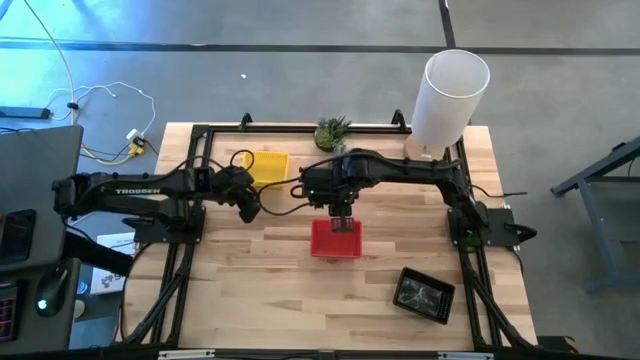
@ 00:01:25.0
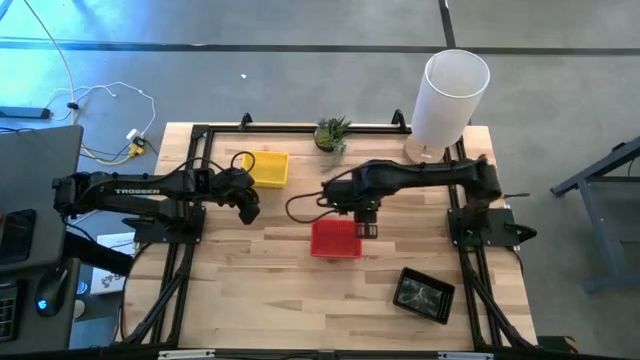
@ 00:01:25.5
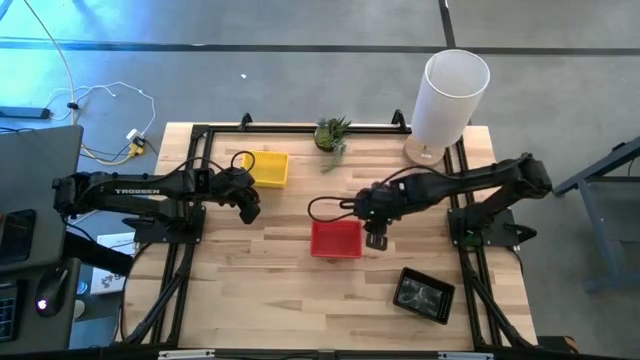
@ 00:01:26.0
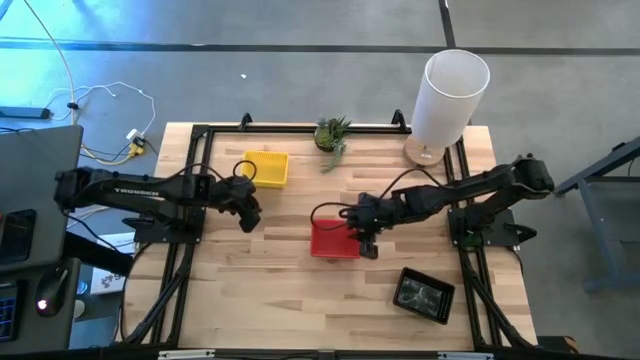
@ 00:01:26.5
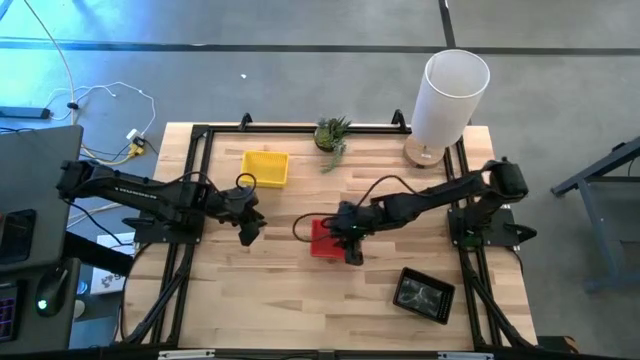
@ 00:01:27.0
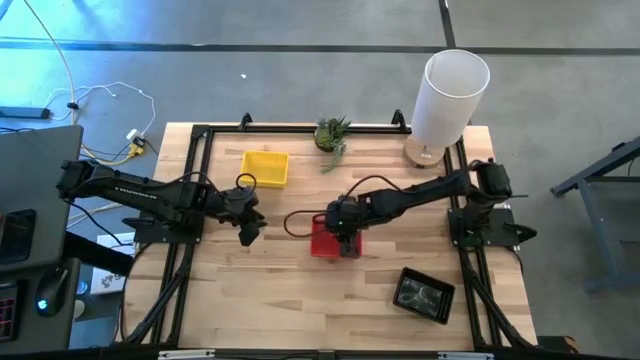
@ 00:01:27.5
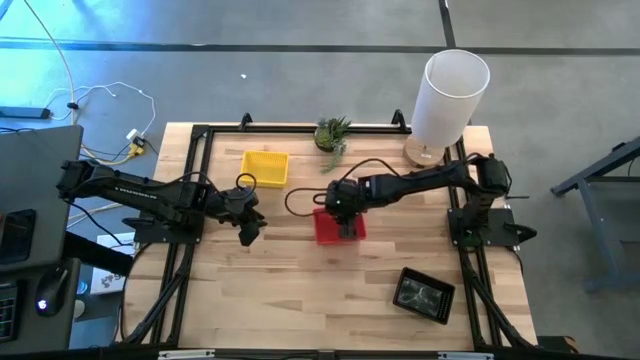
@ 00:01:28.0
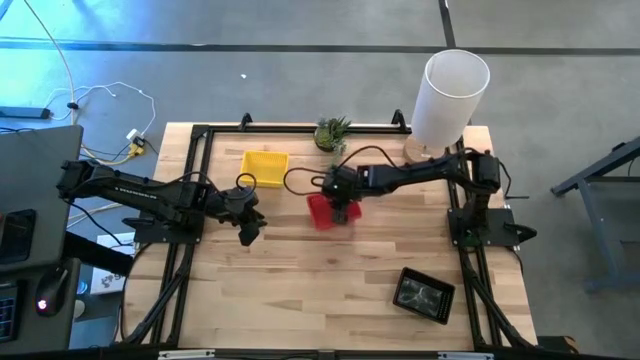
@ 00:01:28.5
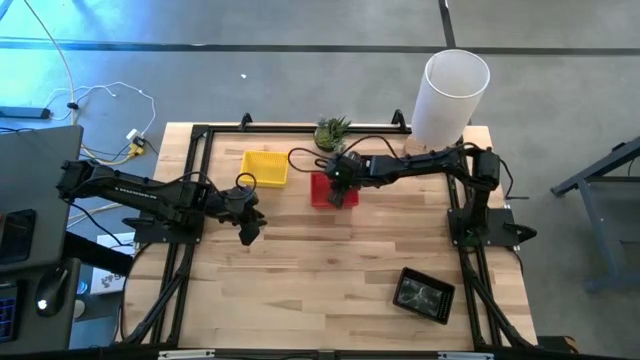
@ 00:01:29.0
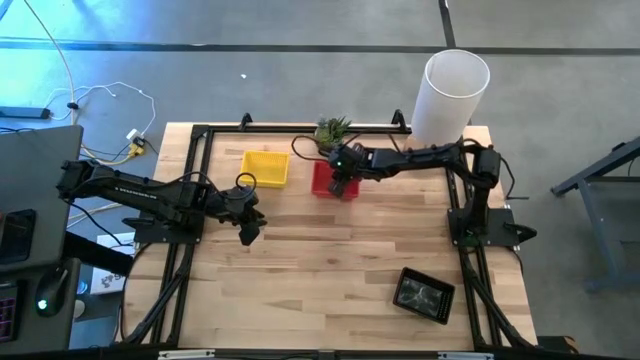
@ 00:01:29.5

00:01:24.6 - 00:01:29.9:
Move the stacked red bins to the top center of the table

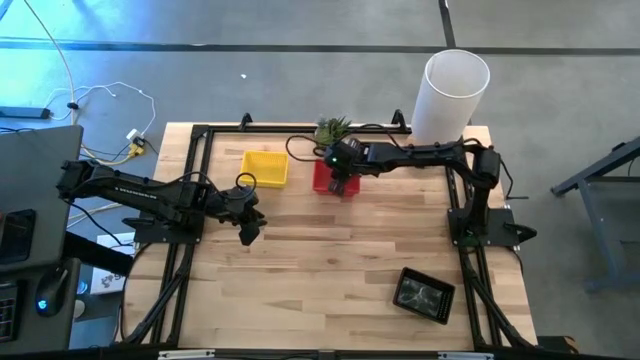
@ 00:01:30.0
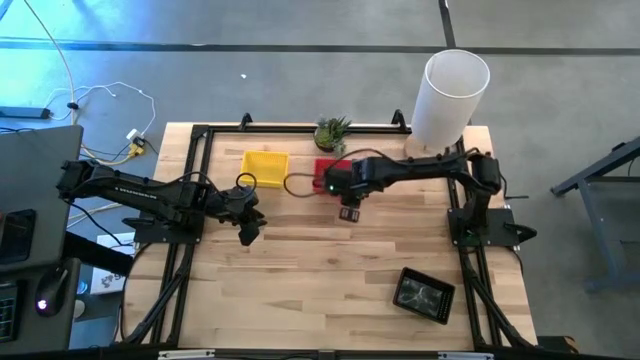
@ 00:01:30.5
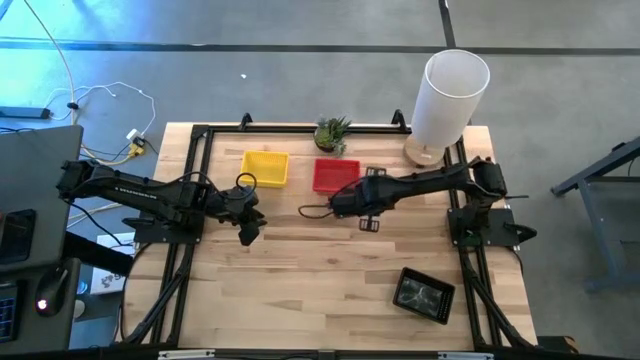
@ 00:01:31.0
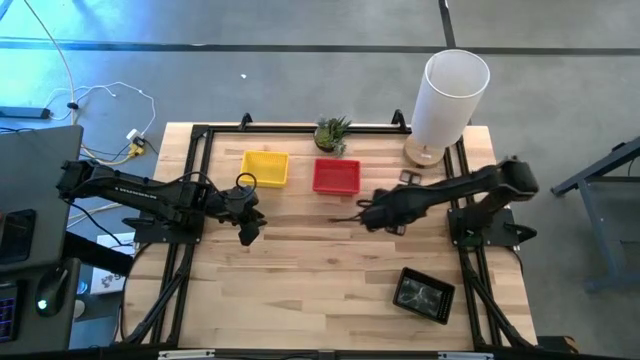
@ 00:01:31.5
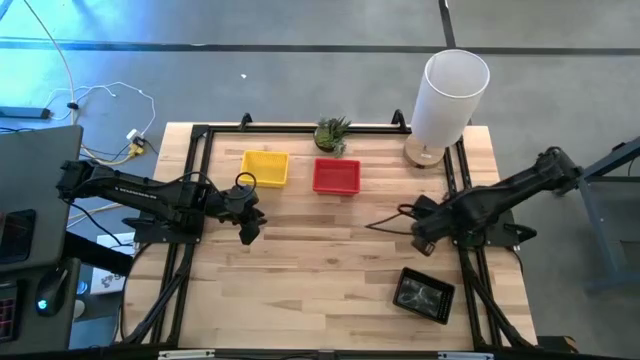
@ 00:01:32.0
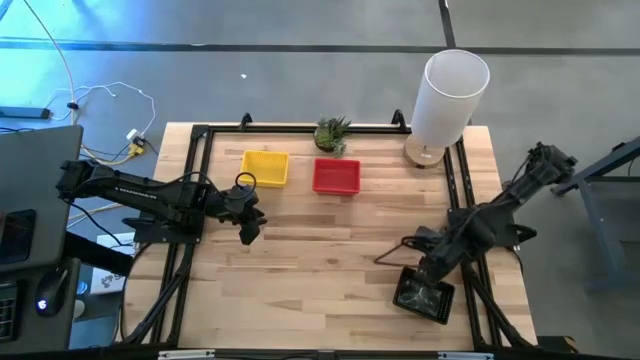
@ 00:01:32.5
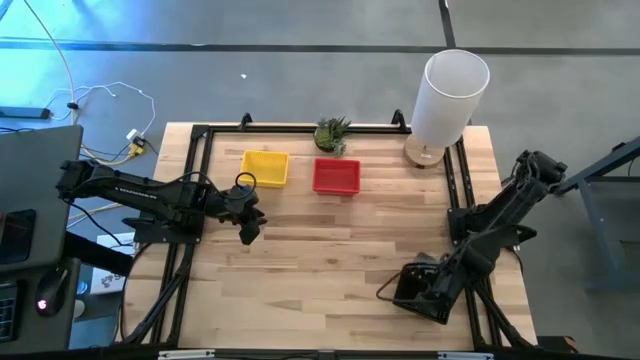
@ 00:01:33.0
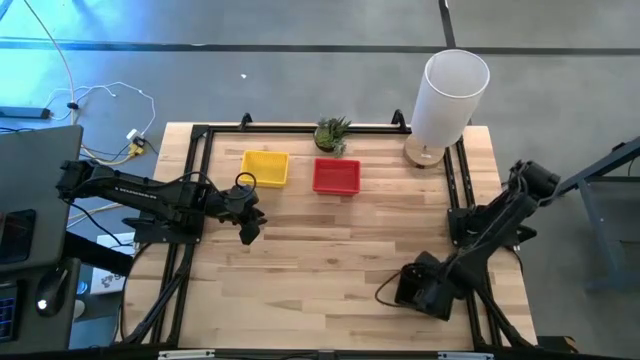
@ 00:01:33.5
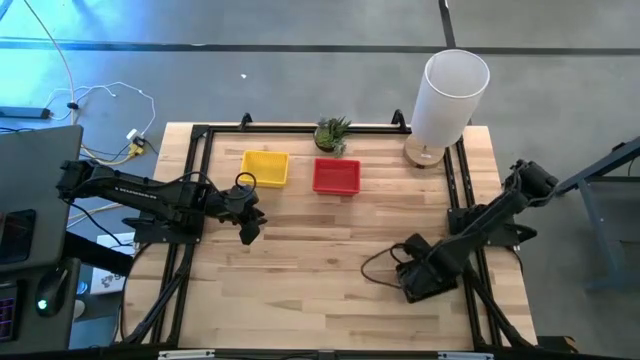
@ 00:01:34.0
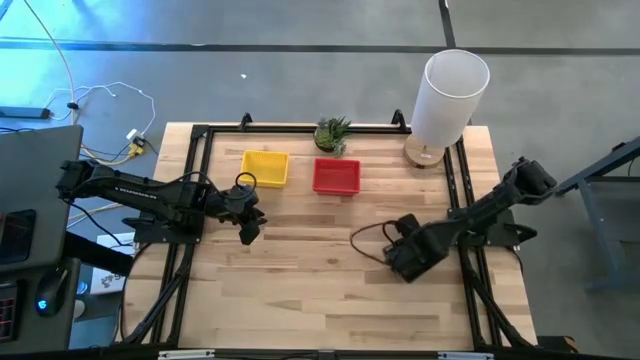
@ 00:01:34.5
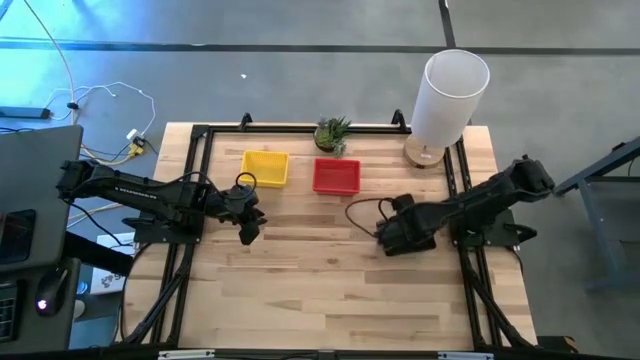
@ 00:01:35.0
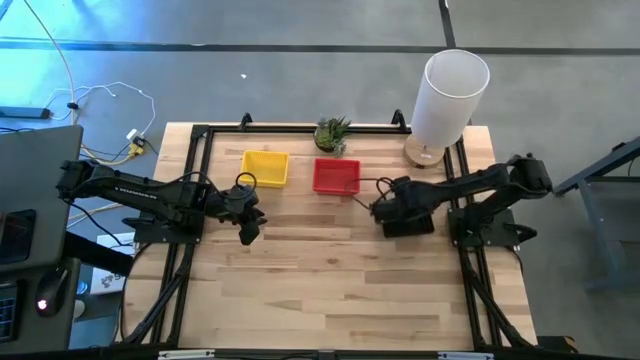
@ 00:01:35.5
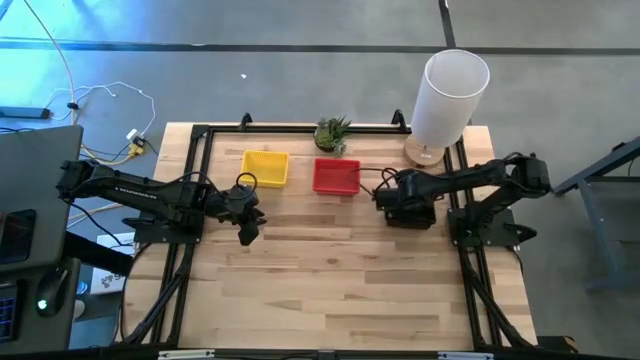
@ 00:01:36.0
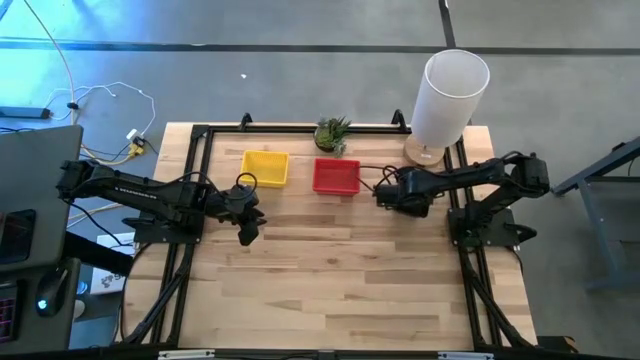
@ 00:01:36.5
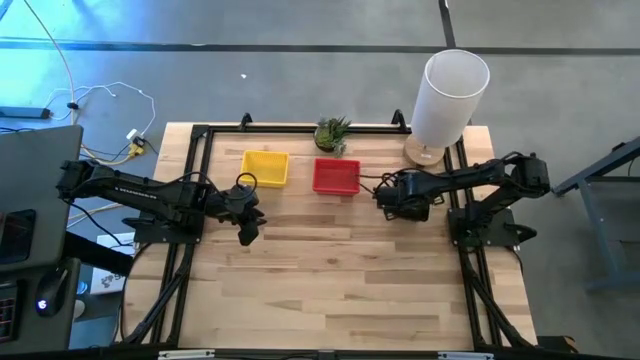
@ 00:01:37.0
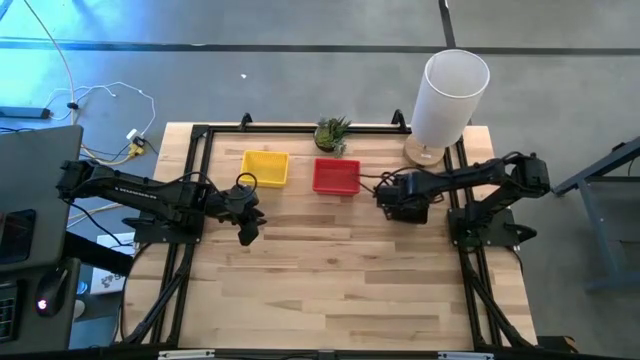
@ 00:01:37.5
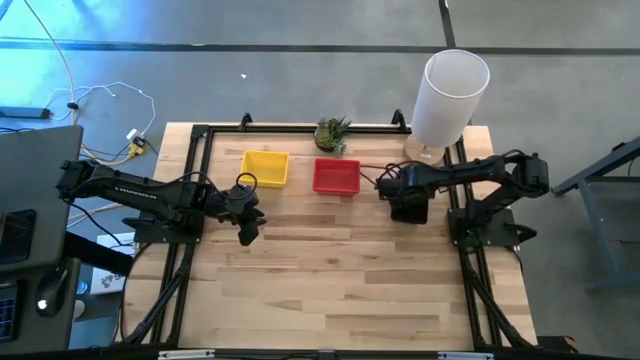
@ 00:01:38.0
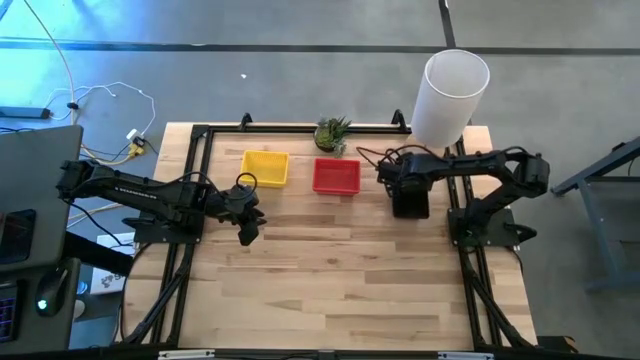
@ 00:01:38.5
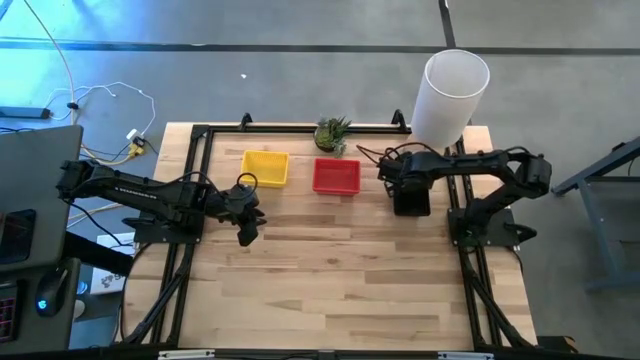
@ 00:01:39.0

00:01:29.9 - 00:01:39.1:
Move the stacked black bins to the top right of the table

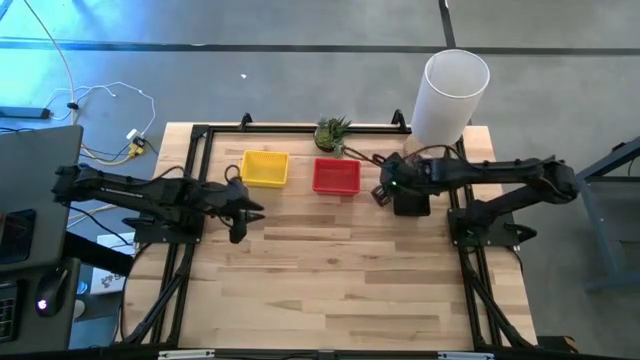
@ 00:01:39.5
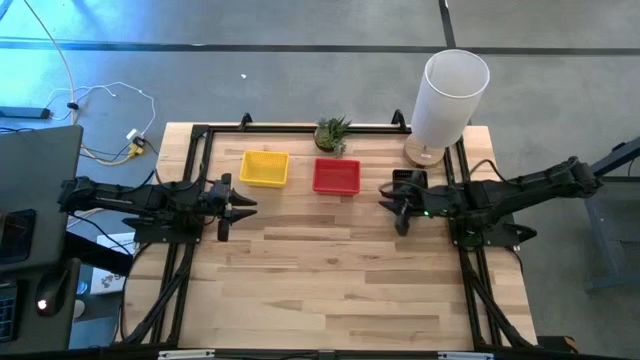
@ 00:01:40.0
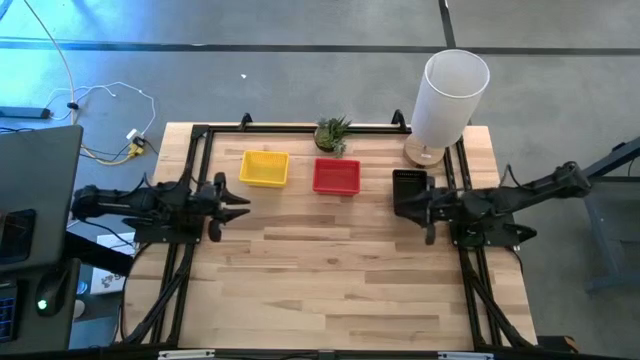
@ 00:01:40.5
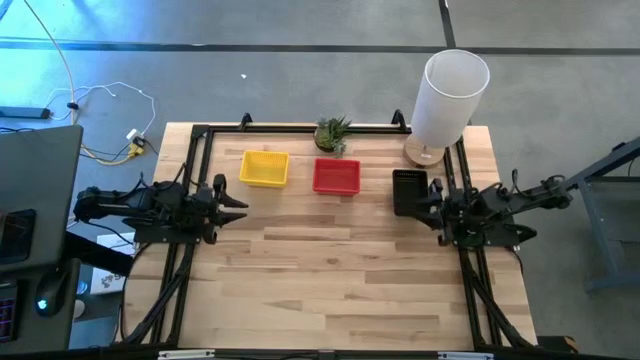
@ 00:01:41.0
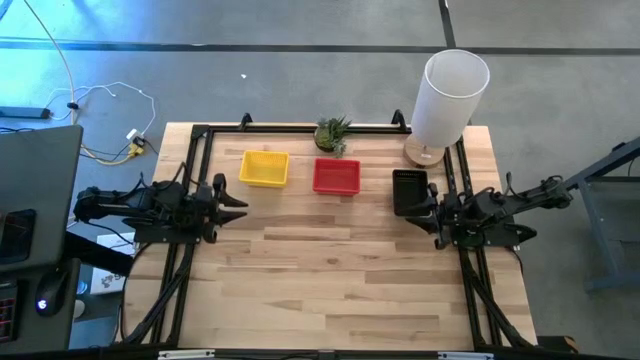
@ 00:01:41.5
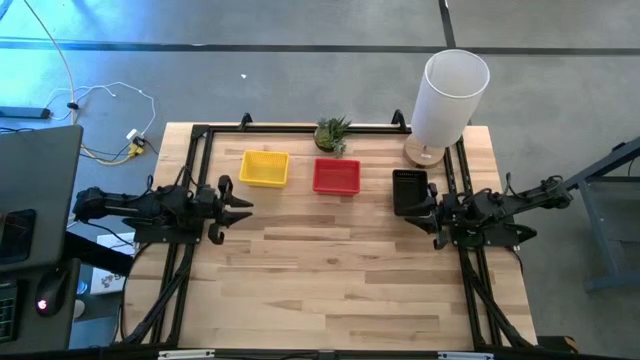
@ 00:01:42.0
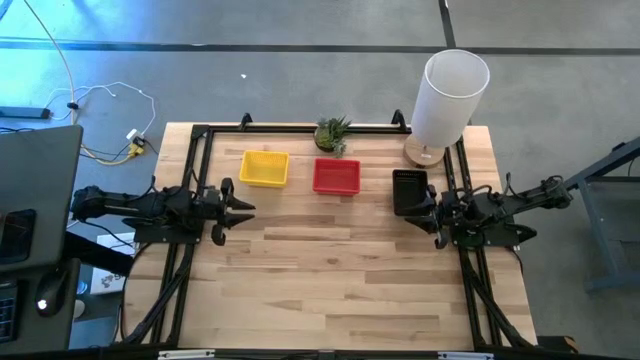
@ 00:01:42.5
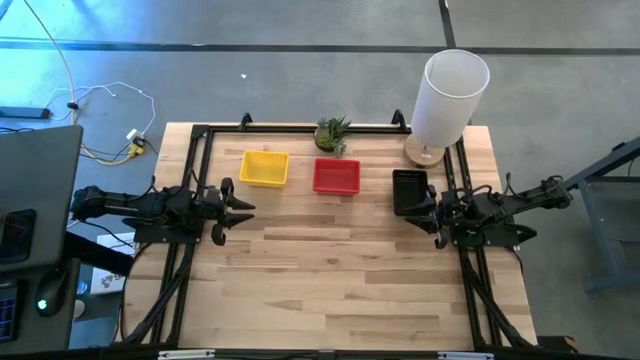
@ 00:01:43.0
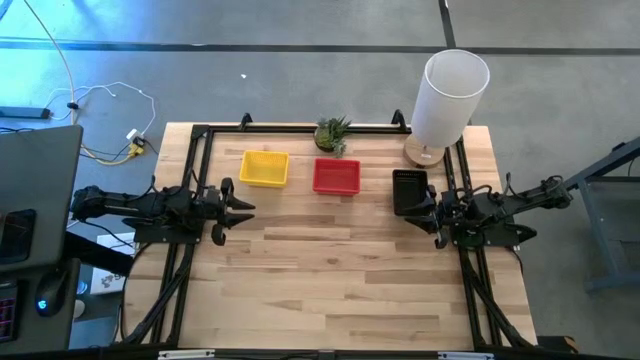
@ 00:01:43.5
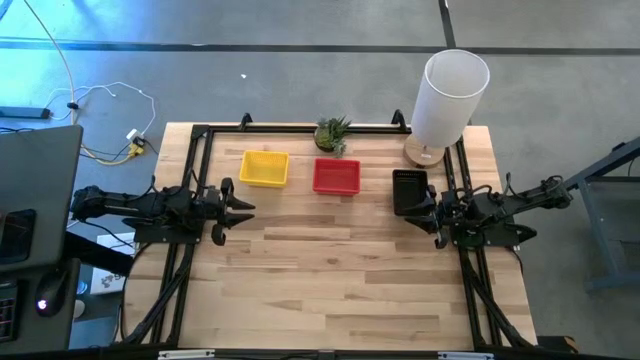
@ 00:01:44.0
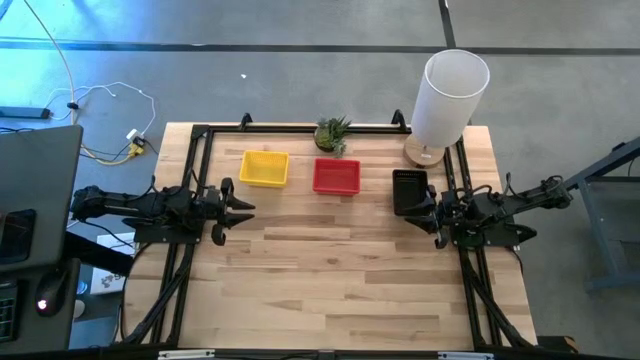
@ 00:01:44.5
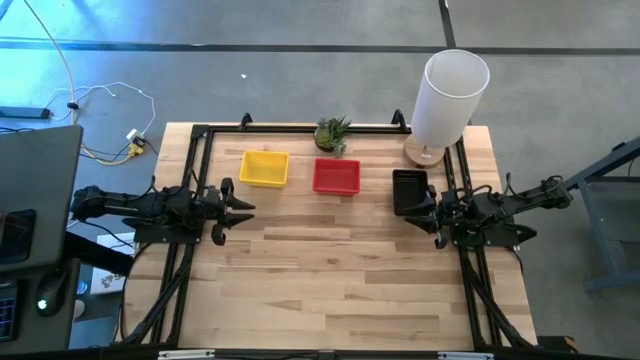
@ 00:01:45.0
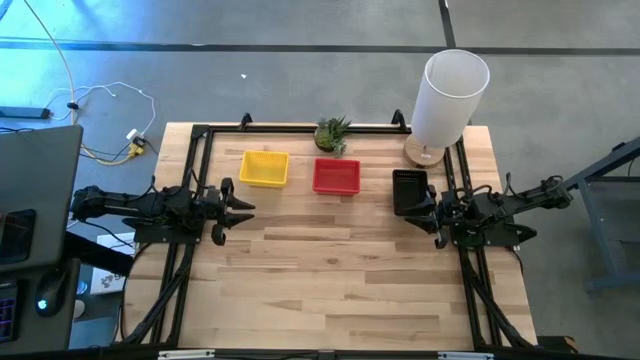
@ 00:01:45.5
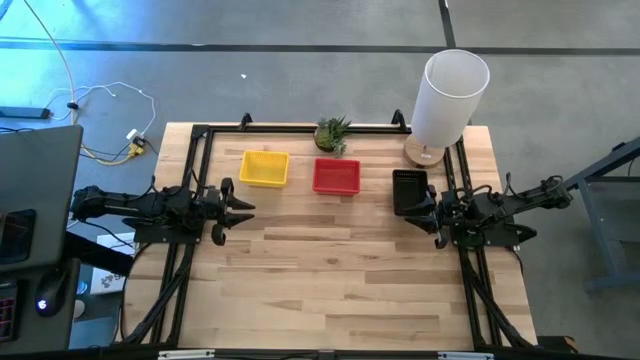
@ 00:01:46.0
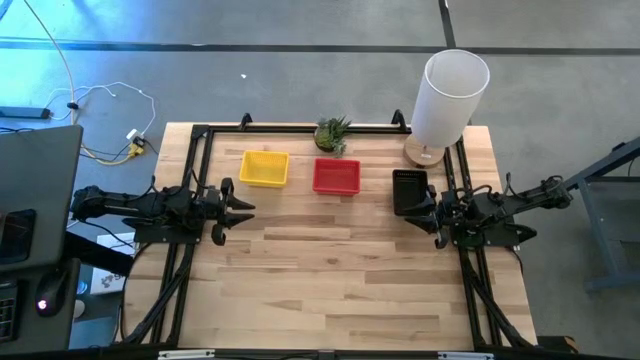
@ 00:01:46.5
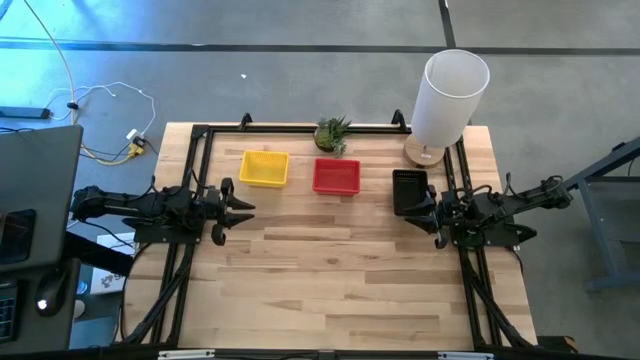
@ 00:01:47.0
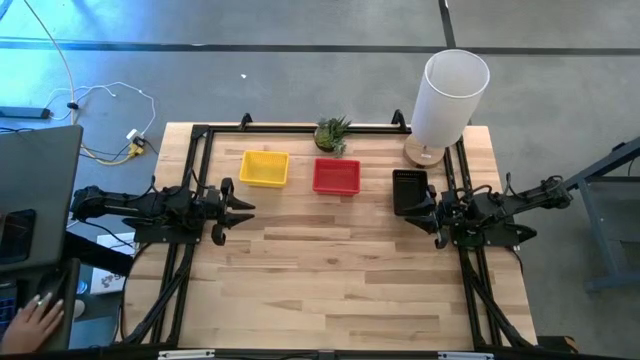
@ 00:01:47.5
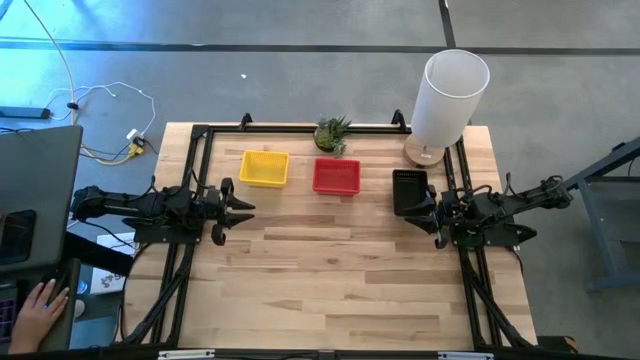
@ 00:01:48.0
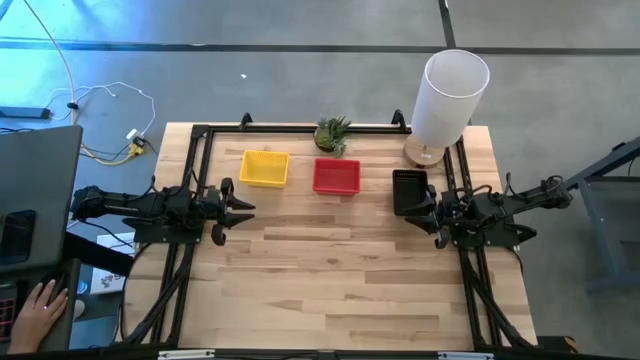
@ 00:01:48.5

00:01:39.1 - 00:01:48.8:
Return to Home Position
